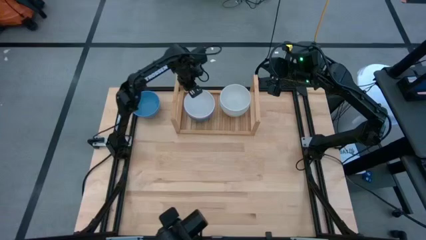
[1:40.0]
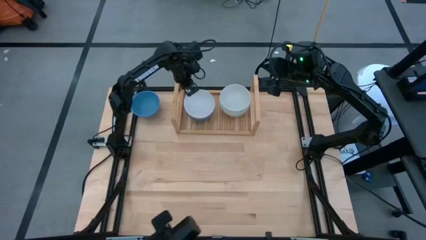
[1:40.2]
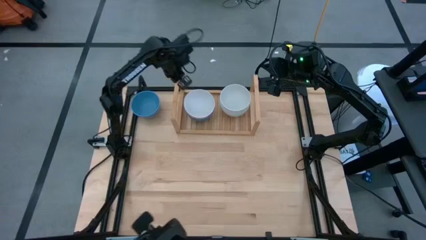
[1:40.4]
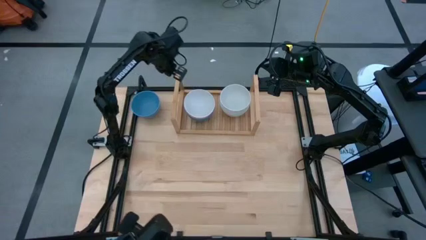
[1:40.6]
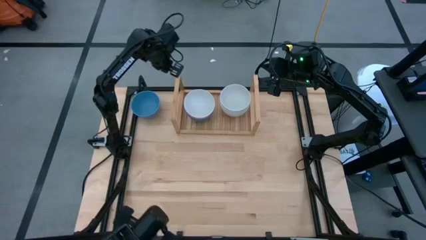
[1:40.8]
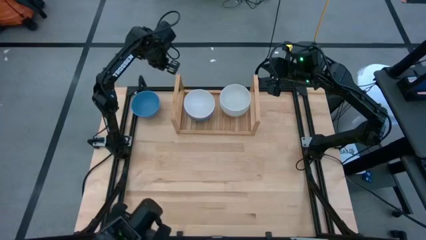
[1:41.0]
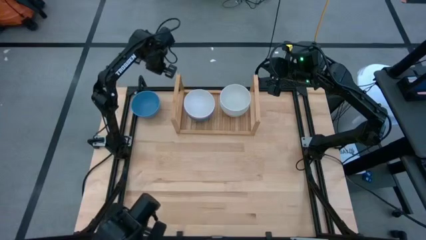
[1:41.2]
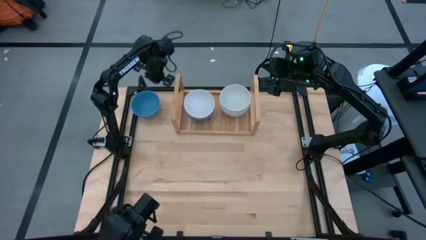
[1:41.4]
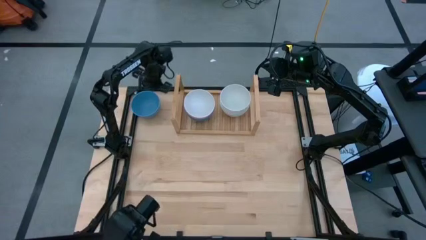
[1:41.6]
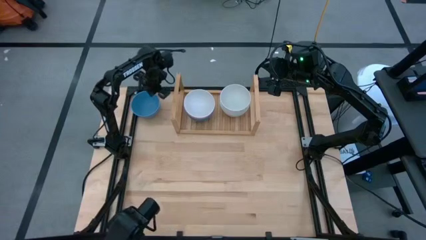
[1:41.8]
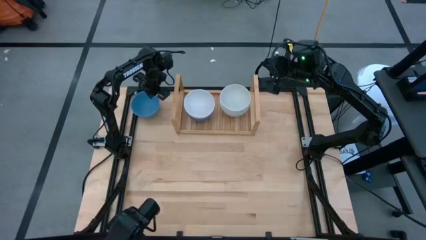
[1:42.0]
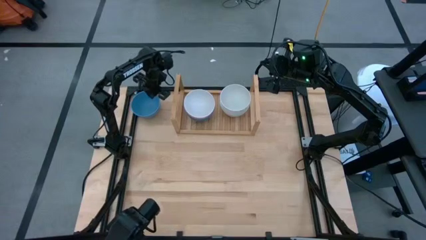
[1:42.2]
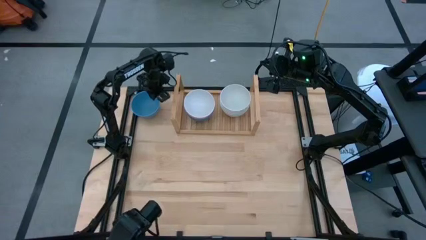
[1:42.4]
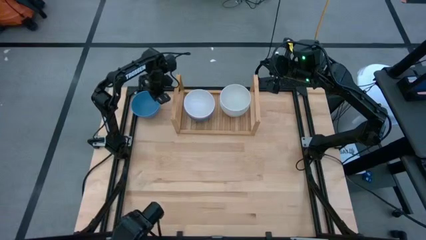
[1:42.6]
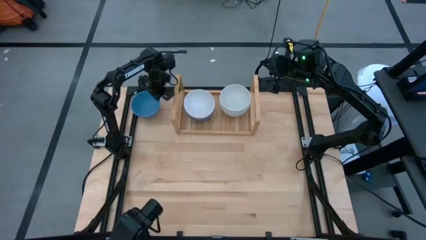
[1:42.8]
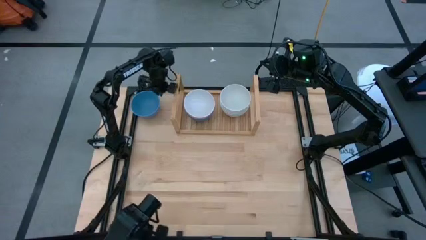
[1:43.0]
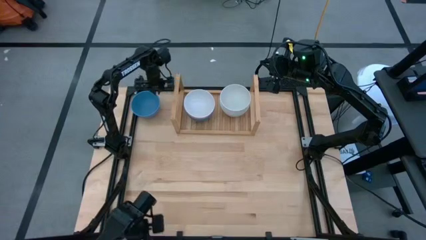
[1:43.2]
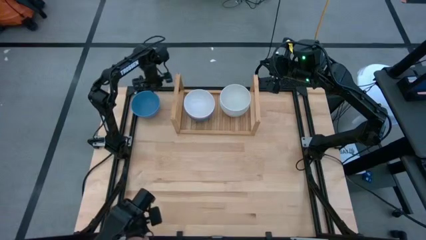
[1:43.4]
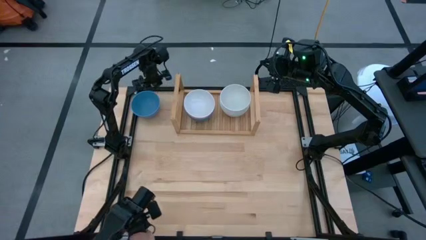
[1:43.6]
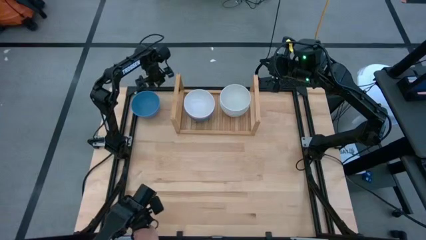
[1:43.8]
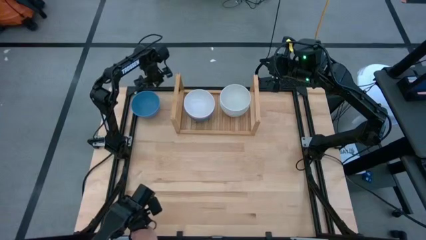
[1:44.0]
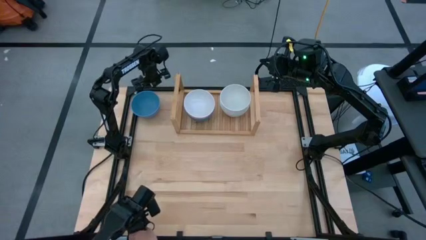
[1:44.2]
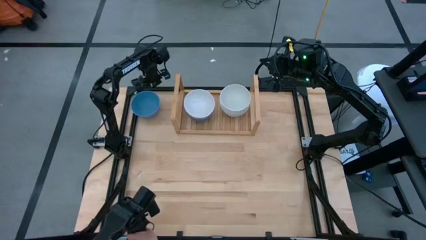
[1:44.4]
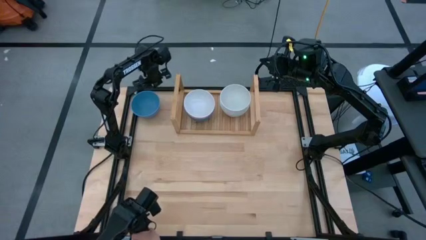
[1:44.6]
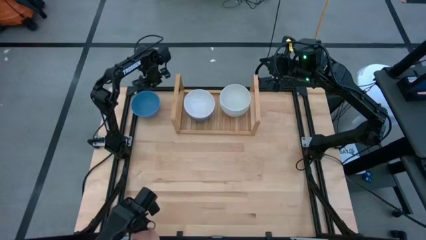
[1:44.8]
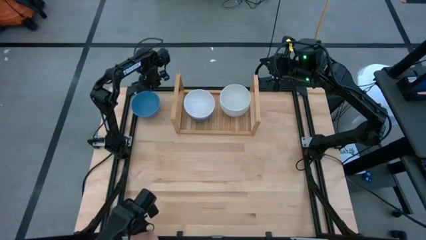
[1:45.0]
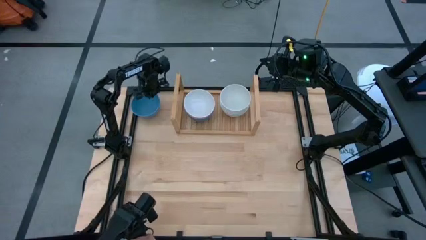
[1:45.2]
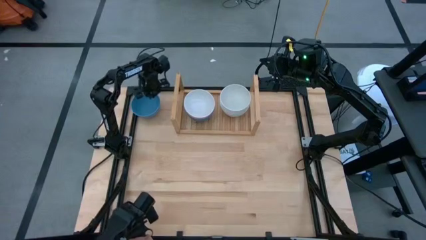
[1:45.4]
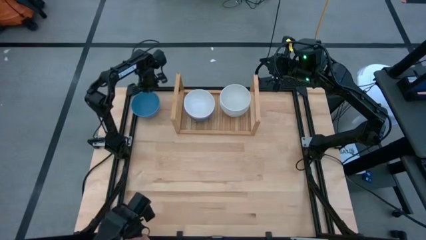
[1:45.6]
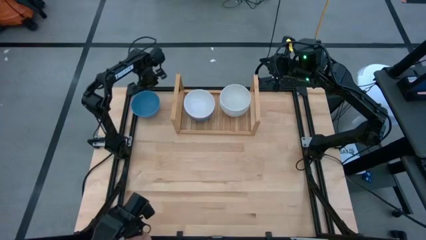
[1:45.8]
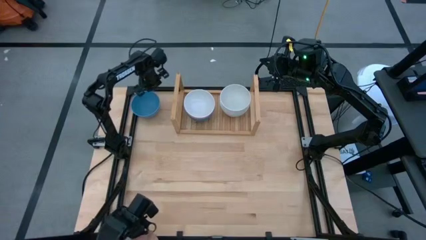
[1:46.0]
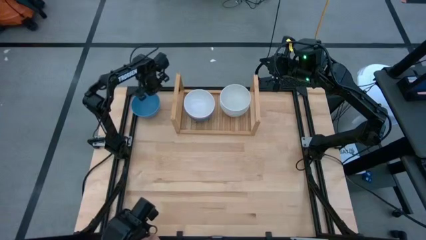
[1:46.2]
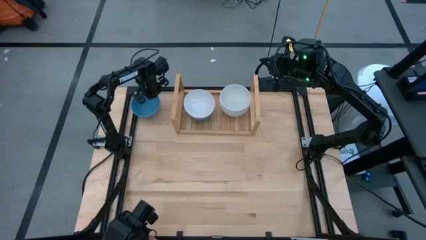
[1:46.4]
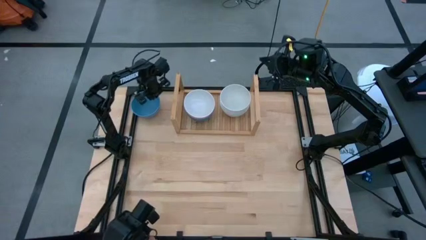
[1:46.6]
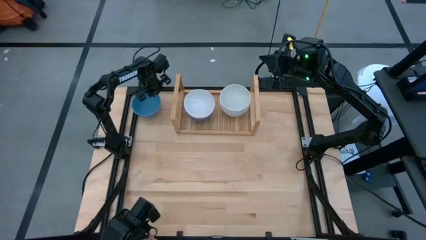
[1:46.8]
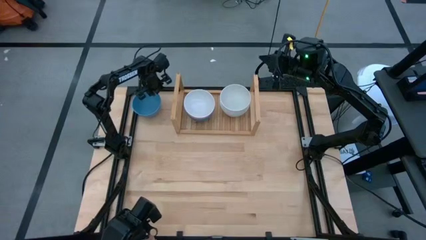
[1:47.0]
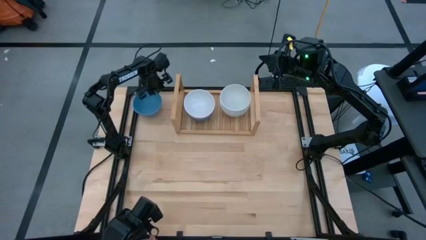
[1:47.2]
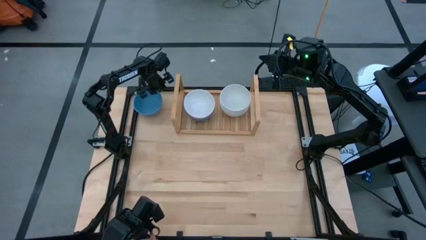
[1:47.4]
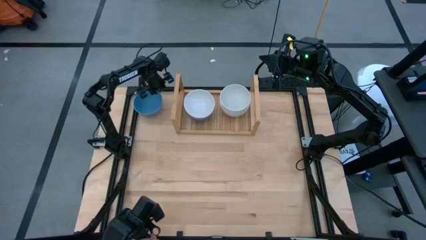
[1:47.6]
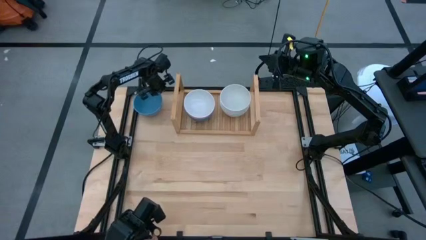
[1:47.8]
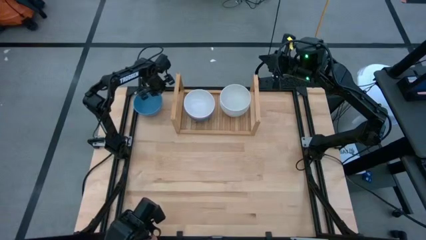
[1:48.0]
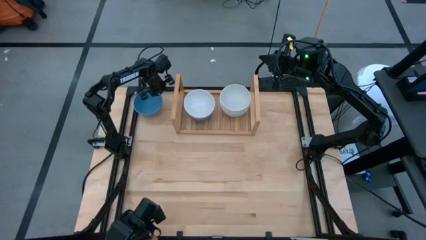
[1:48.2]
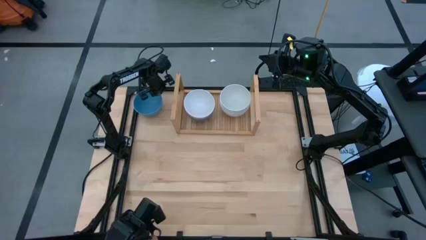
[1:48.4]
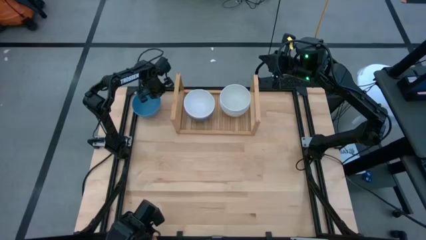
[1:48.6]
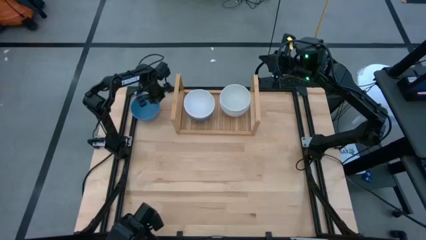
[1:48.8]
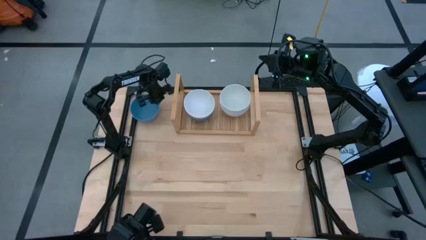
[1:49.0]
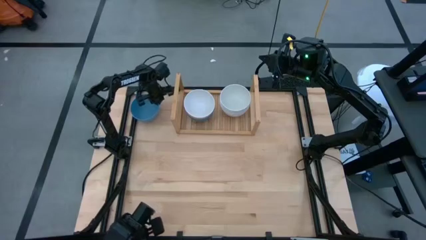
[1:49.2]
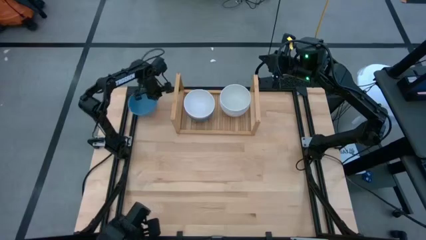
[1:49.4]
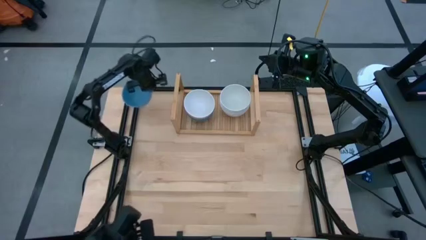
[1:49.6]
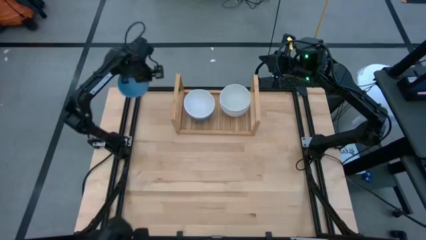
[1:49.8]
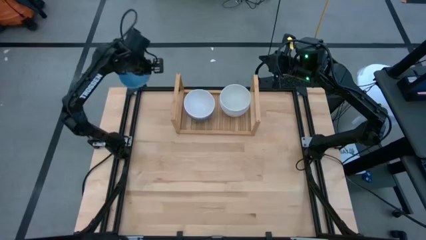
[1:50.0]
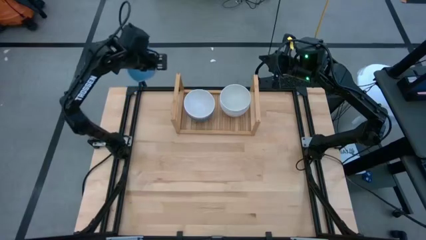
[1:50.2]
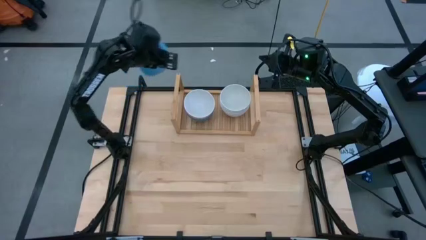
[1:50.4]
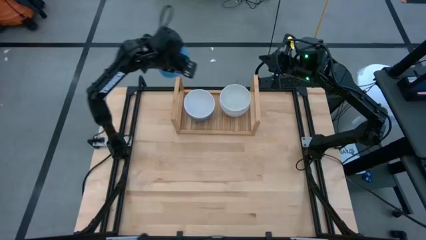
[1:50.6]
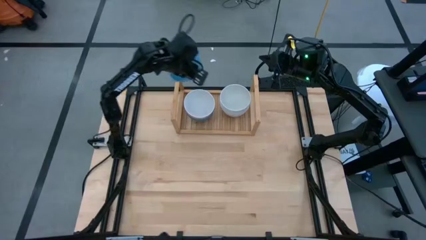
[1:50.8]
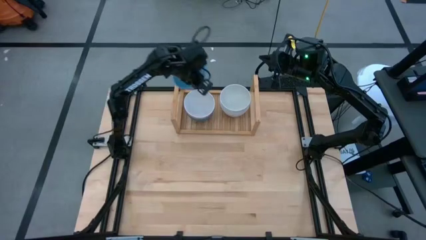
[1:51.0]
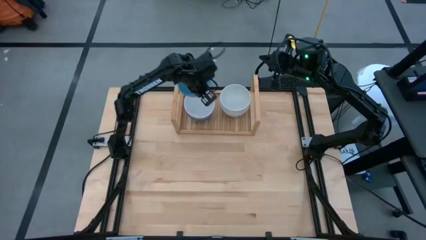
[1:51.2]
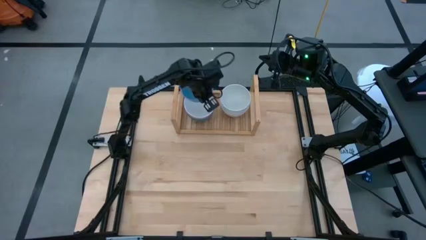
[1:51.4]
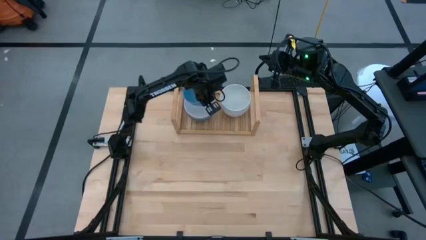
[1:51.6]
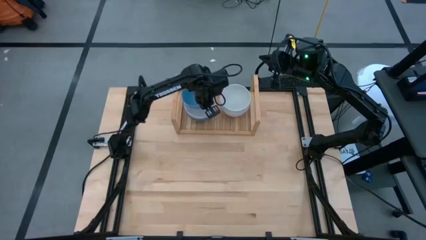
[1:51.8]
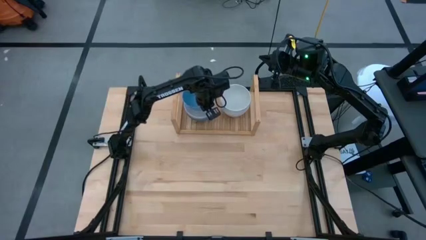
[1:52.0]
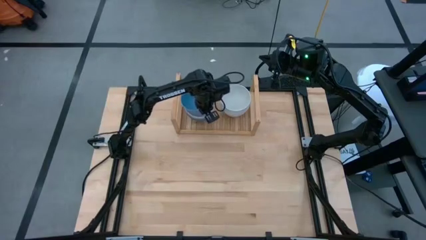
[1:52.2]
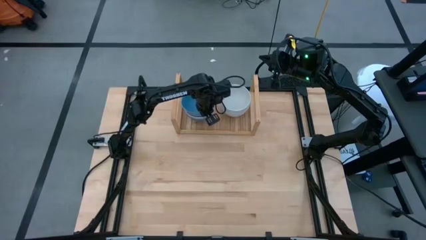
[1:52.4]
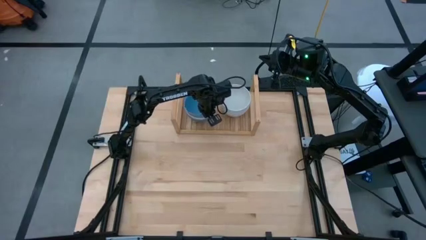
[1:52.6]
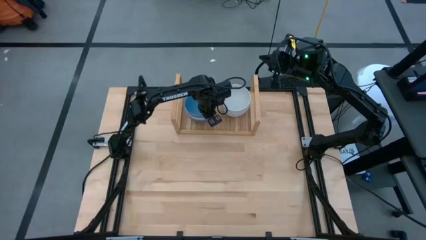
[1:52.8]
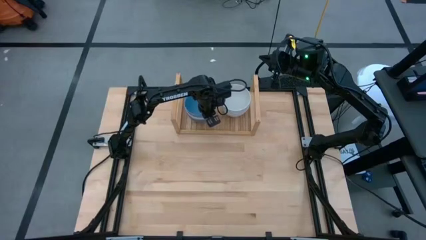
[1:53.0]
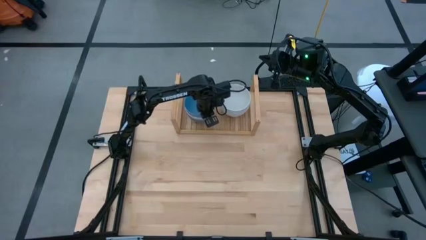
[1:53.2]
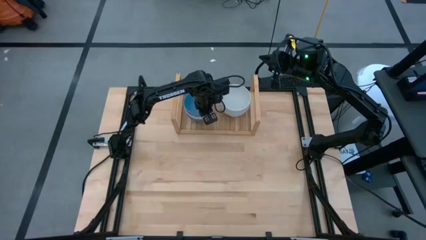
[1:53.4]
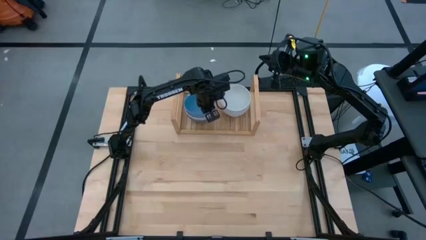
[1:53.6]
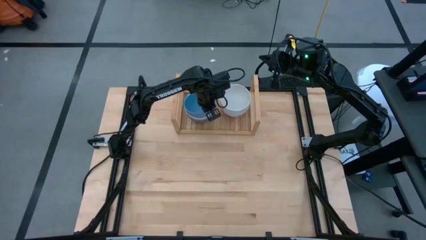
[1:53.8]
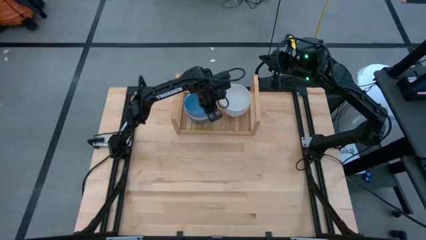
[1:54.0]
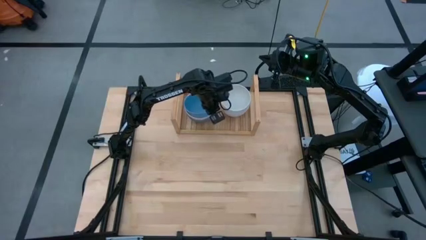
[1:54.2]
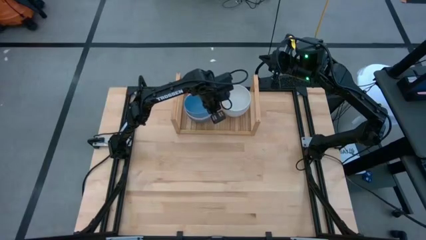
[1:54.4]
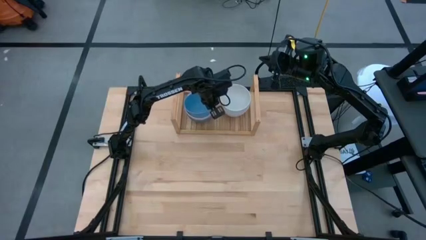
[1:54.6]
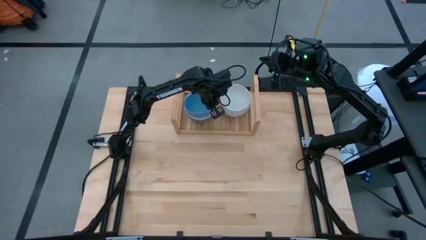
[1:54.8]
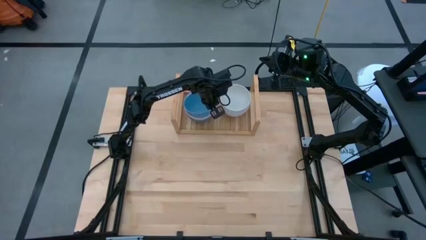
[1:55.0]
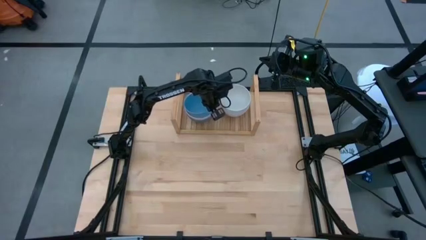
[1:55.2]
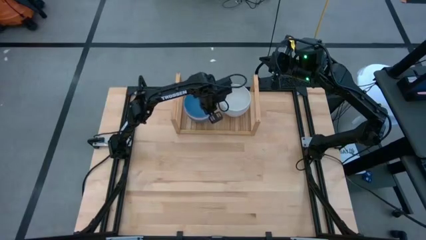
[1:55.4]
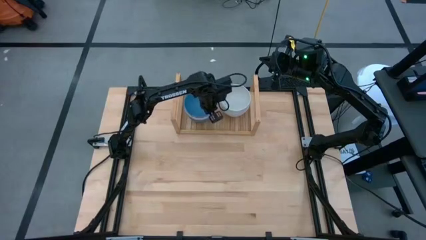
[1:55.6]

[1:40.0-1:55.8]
Task: Place and stack bowls onto a shelf
Stack the blue bowl on top of the left white bowl on the shelf
